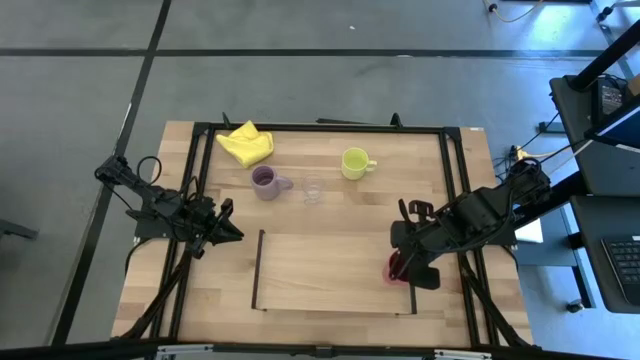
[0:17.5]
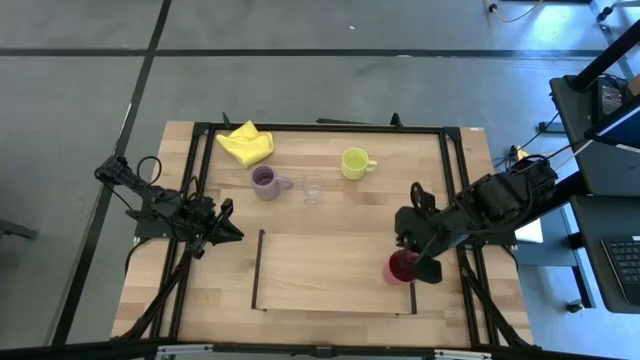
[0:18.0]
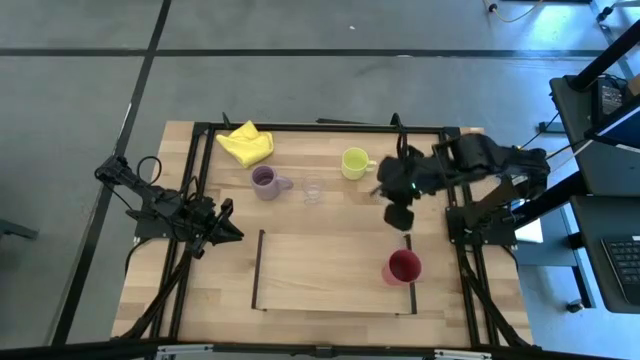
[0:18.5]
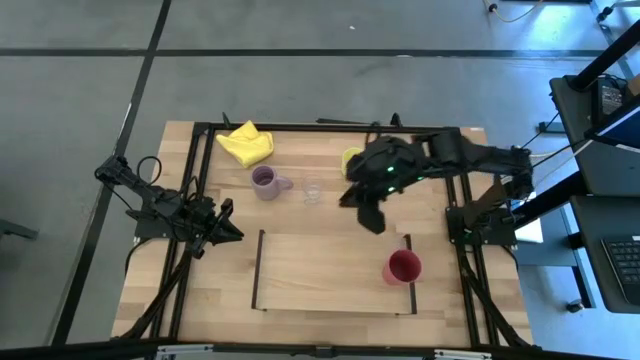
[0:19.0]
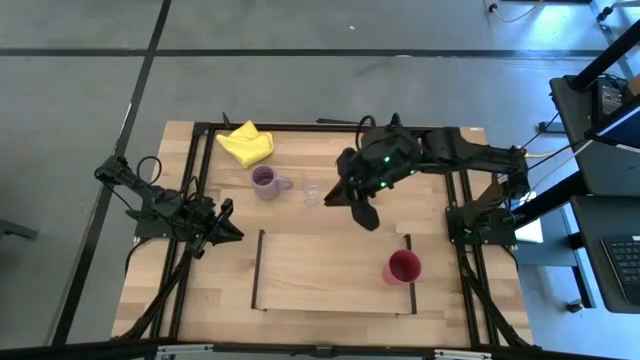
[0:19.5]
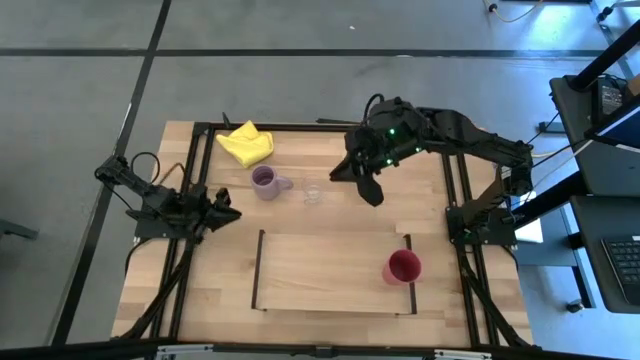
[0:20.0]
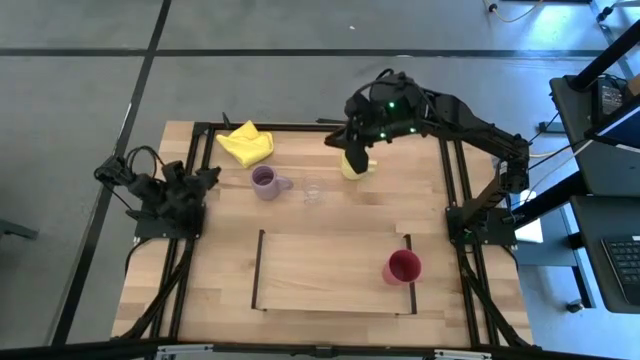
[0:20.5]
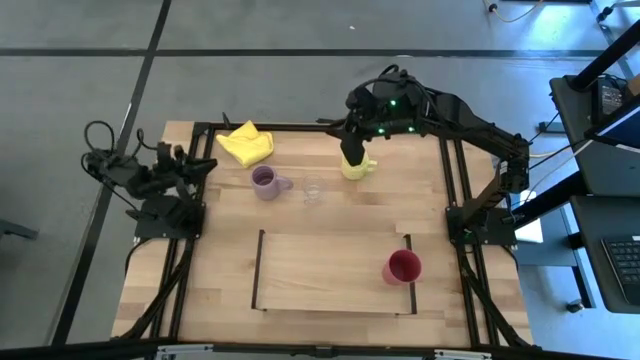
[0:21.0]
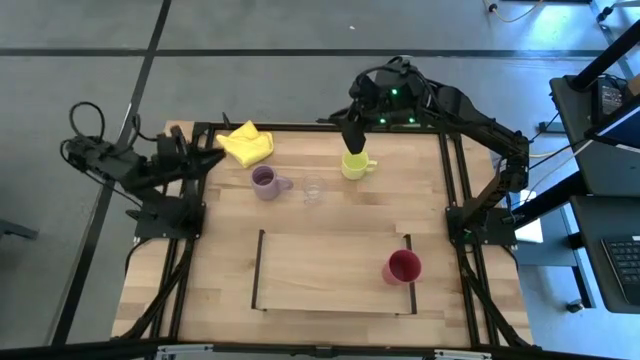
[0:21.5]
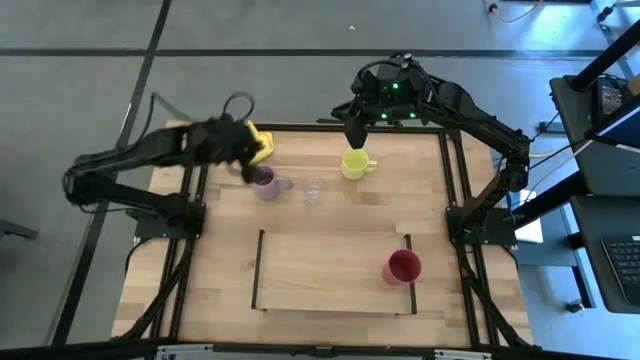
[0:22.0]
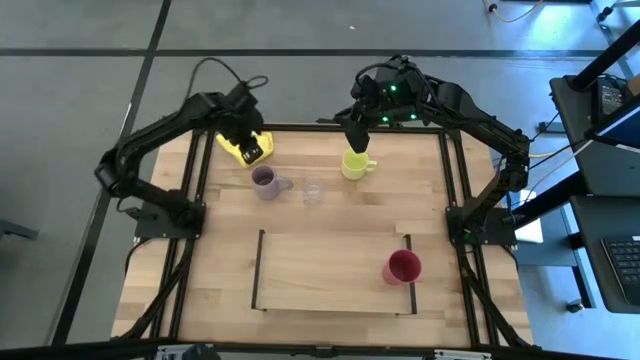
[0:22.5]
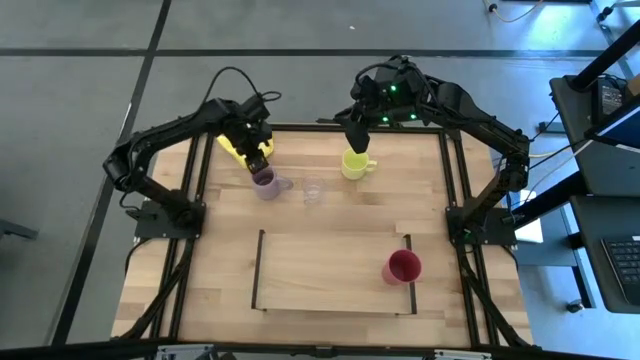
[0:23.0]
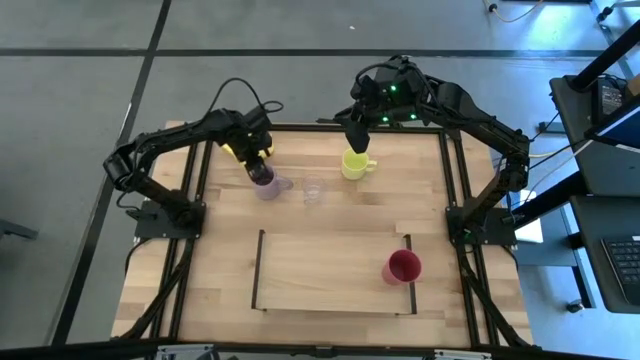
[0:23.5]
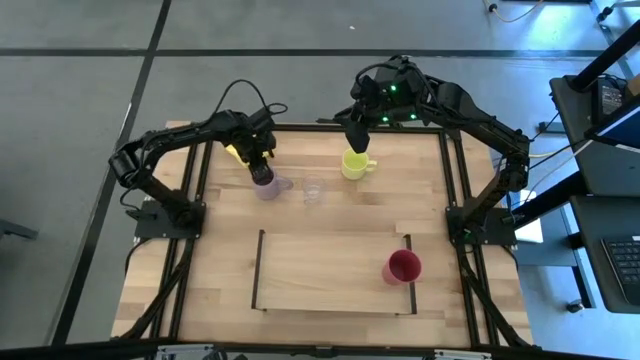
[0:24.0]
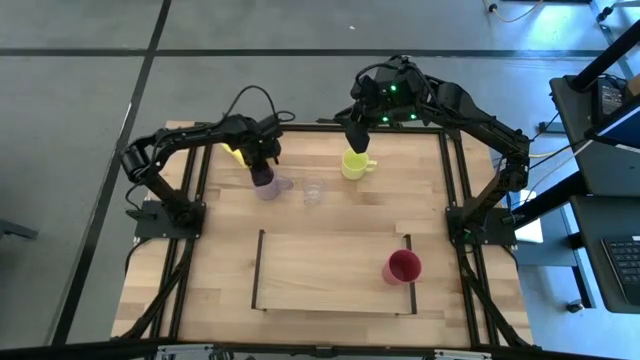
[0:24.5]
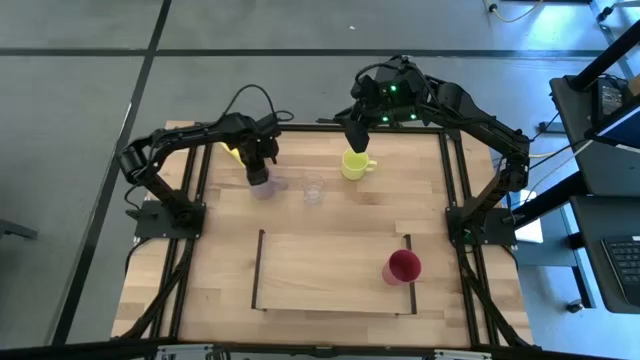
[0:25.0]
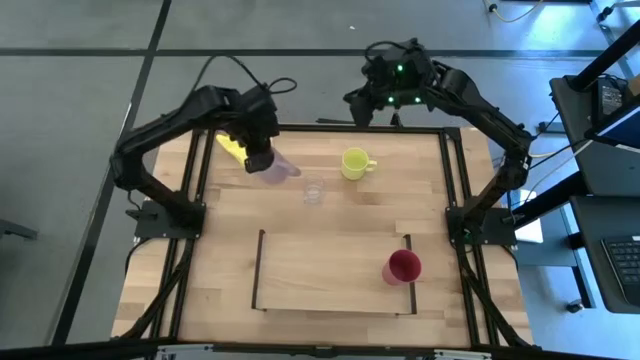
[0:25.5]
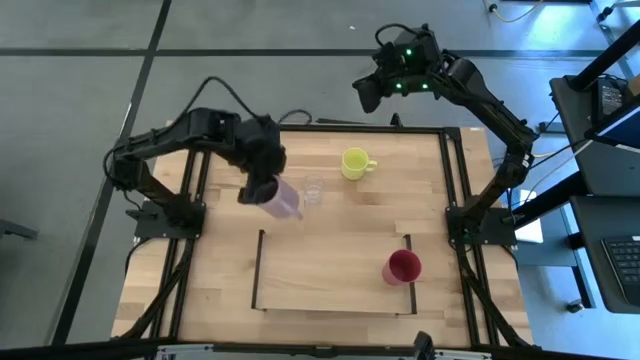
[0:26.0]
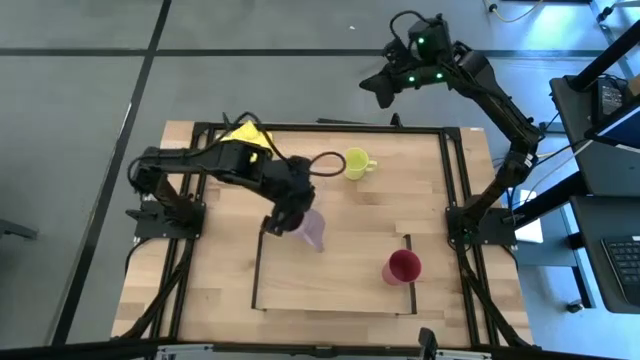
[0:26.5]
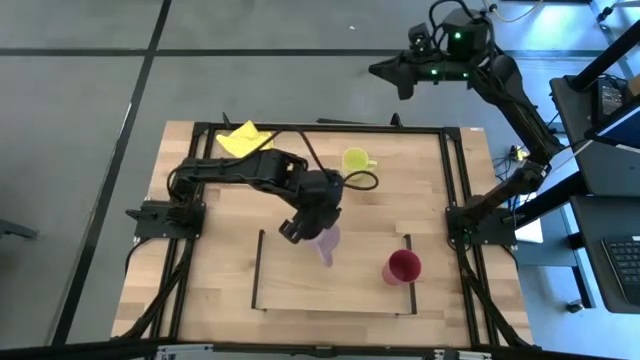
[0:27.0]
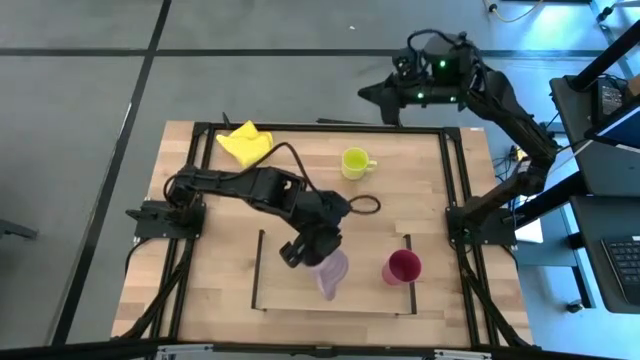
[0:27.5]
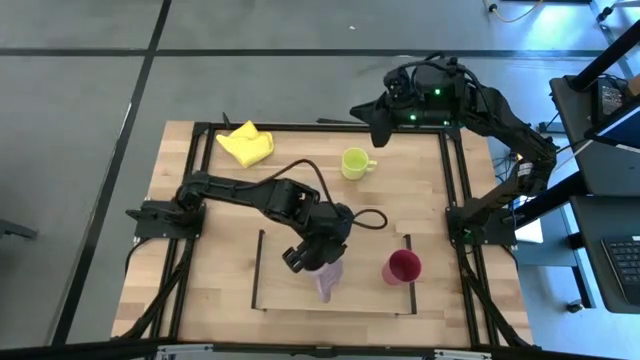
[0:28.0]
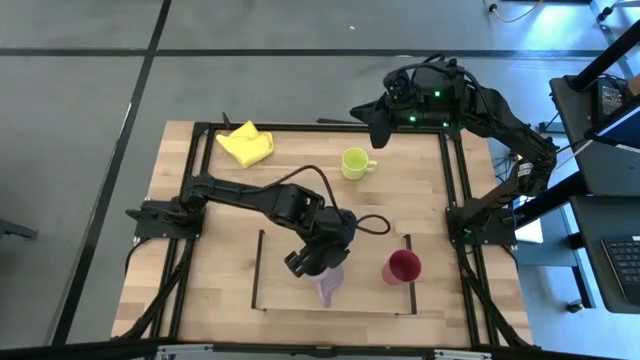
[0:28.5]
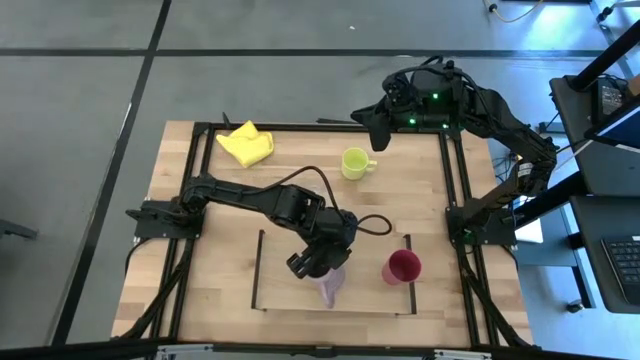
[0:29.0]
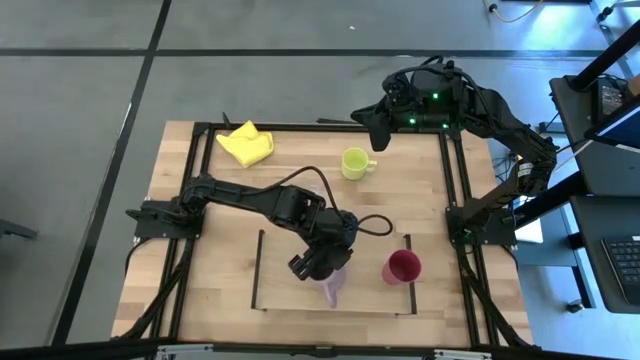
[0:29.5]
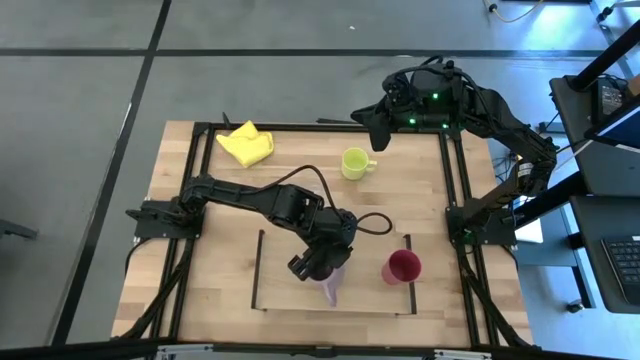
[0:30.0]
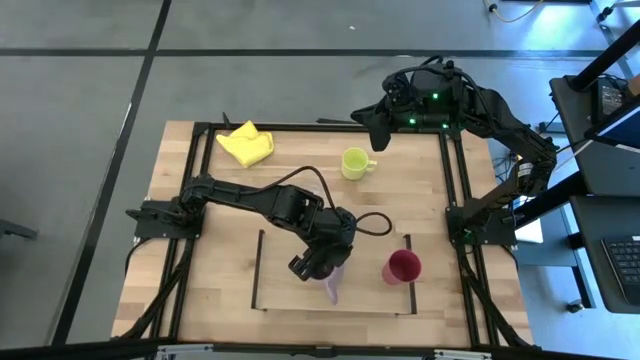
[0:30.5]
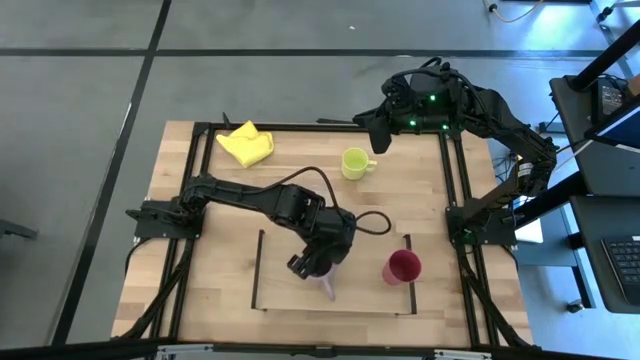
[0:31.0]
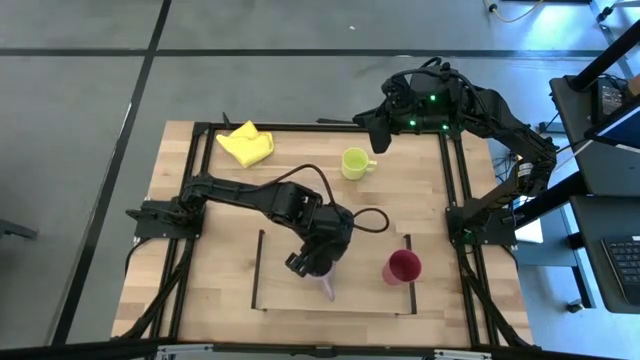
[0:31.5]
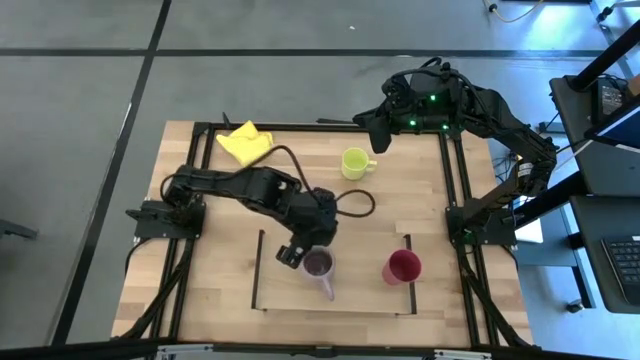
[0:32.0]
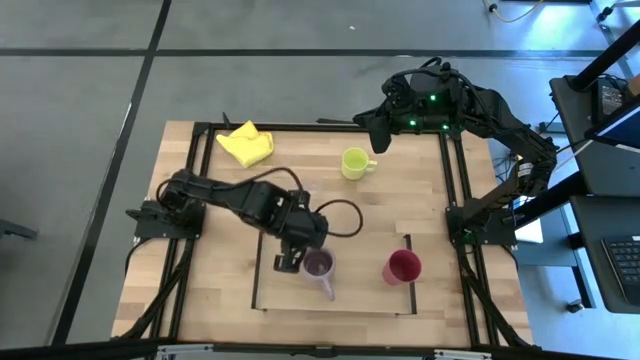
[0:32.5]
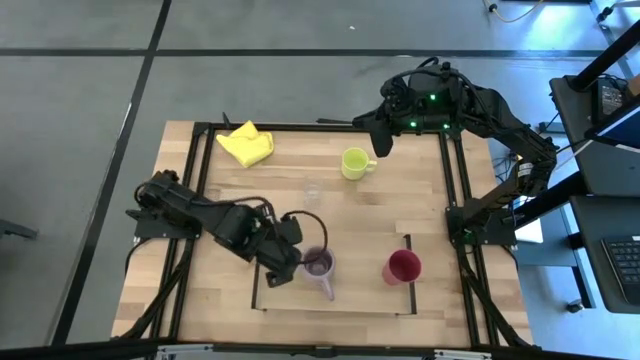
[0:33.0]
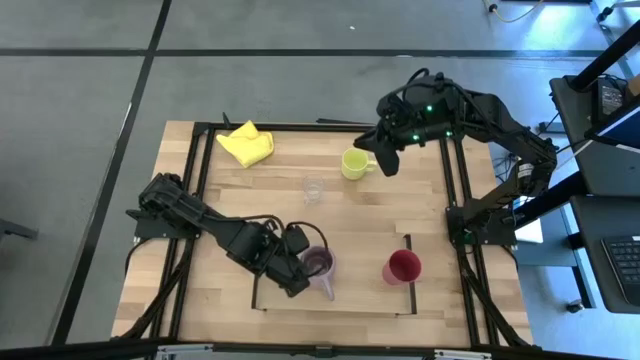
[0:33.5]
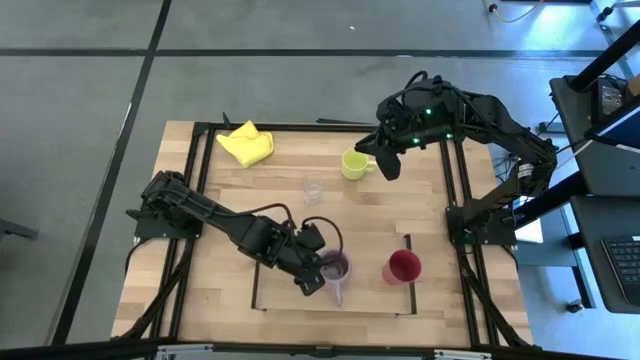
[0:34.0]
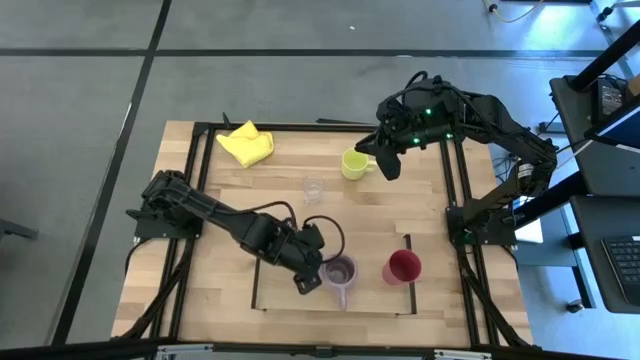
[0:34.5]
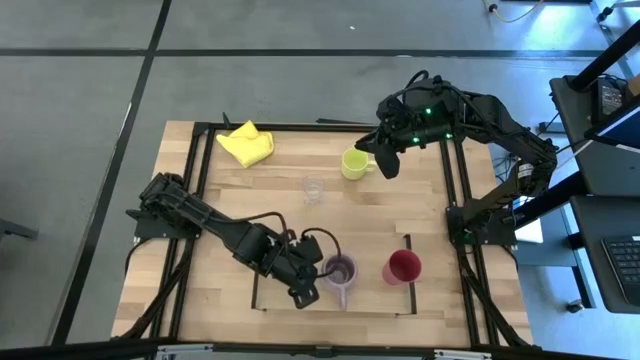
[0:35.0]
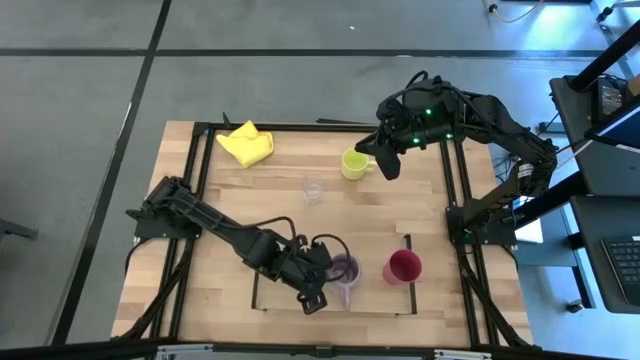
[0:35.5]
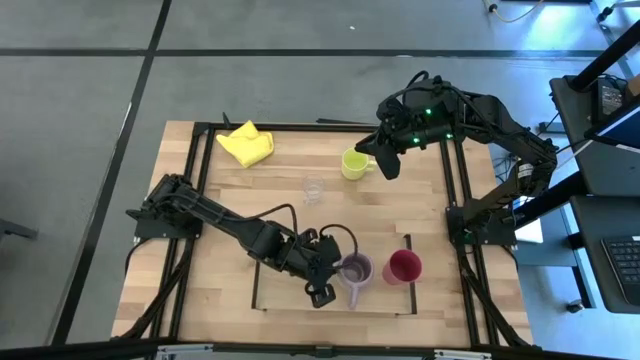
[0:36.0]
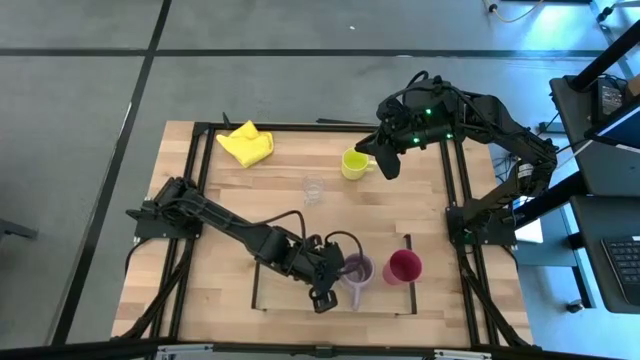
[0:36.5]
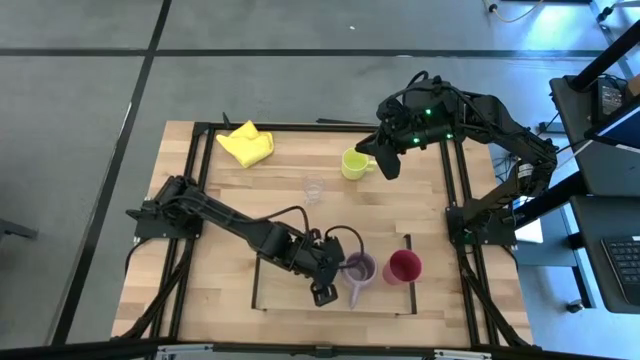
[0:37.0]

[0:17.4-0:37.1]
Task: Stack small to large cups/mugs on shelf
Put the purple mug on the shelf
